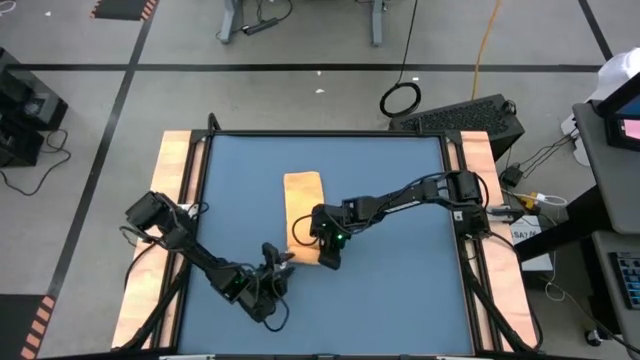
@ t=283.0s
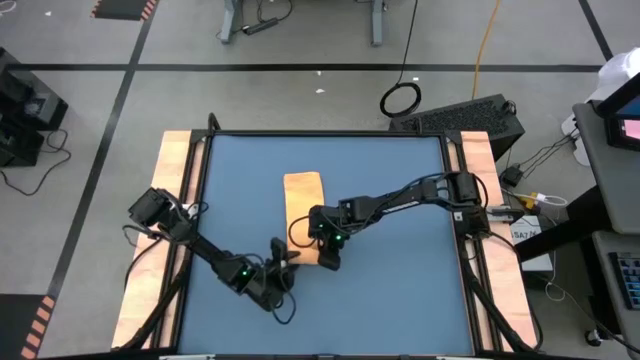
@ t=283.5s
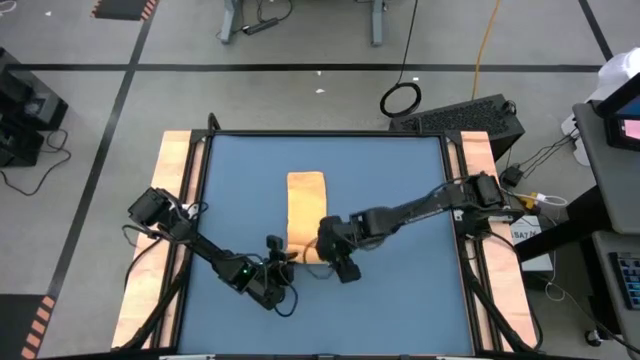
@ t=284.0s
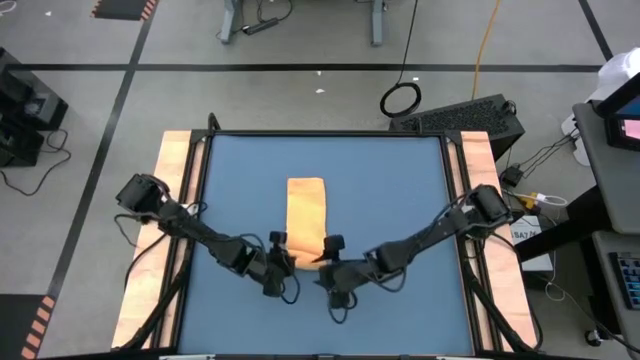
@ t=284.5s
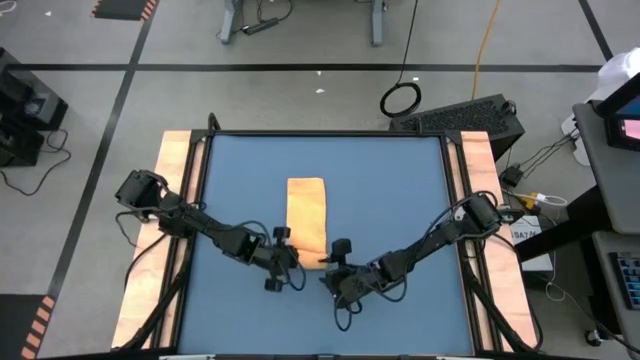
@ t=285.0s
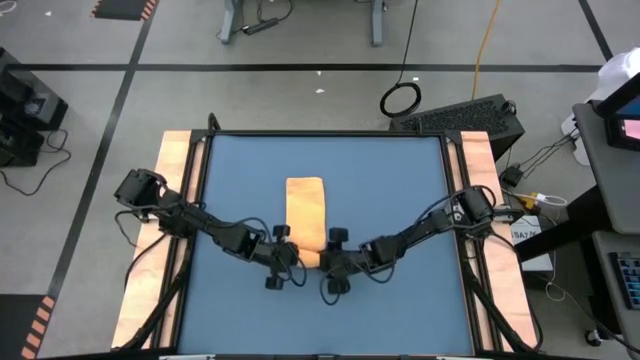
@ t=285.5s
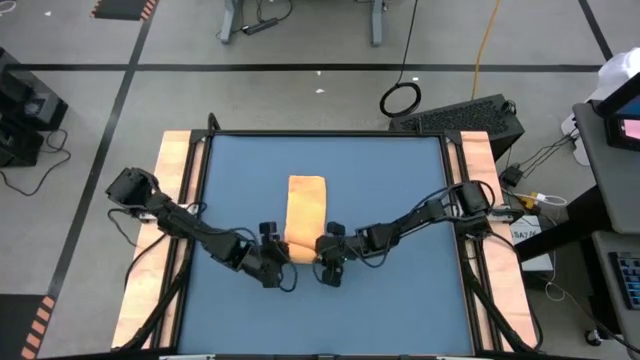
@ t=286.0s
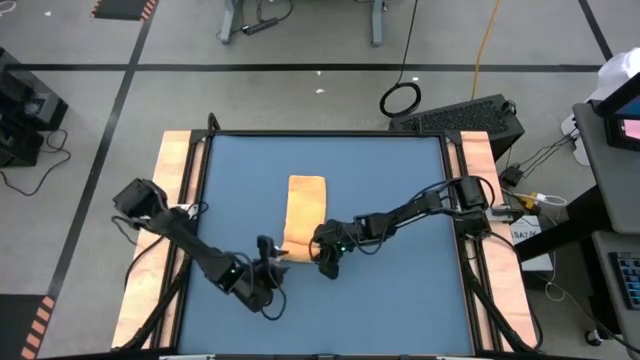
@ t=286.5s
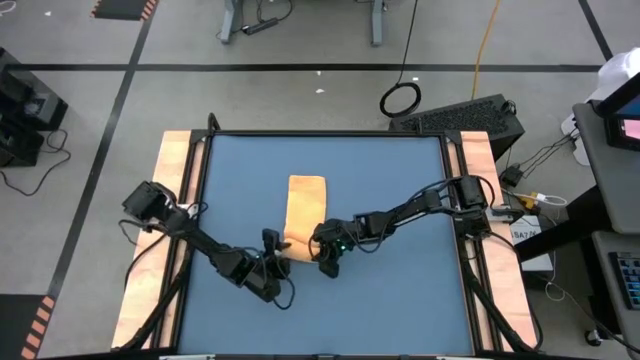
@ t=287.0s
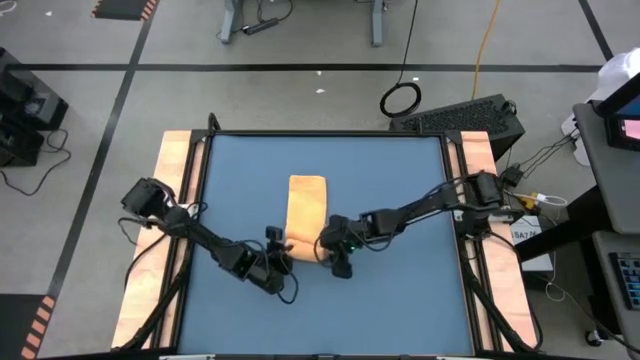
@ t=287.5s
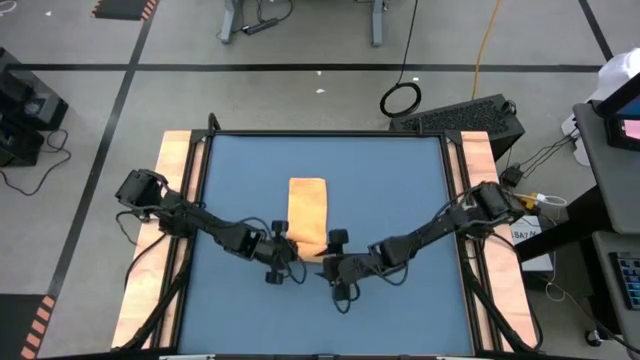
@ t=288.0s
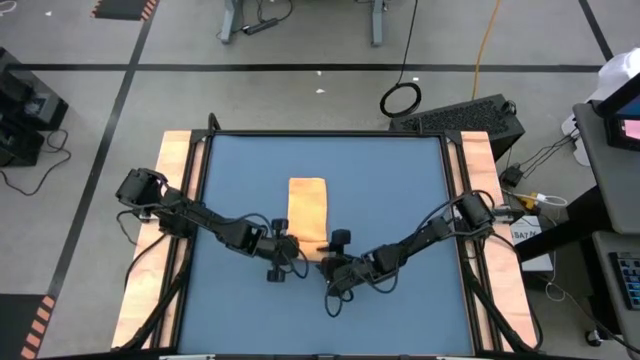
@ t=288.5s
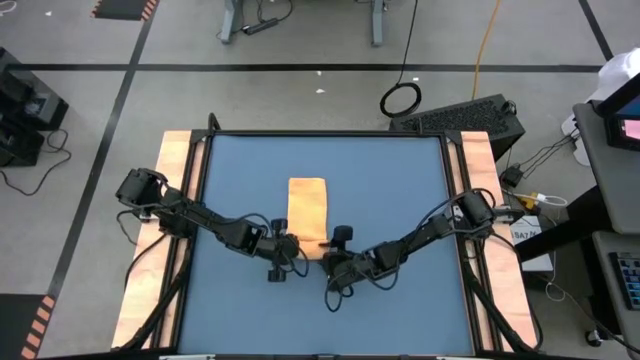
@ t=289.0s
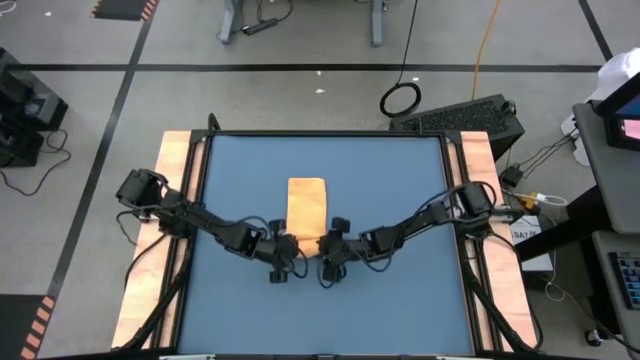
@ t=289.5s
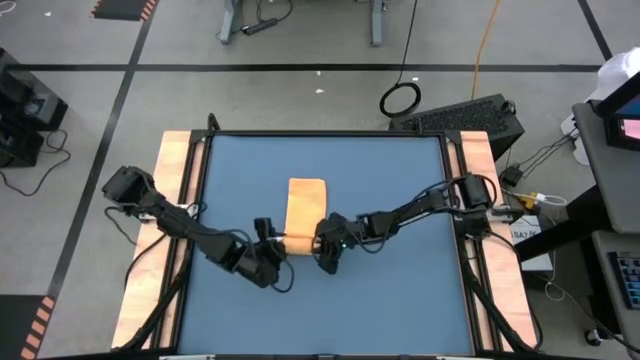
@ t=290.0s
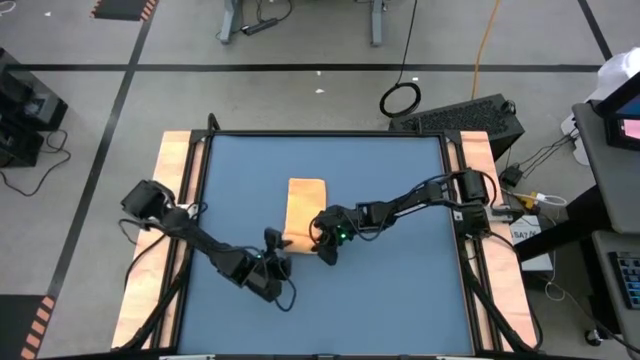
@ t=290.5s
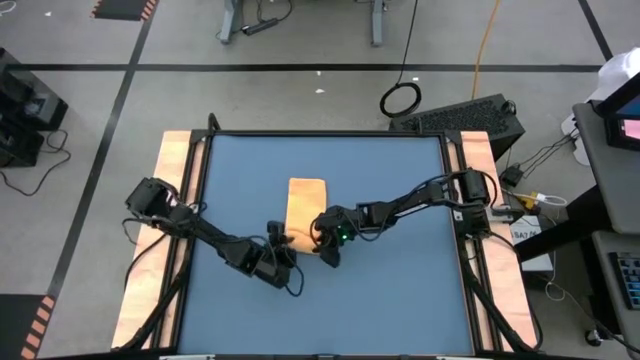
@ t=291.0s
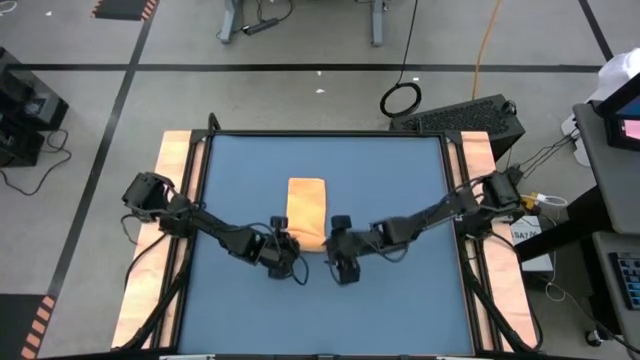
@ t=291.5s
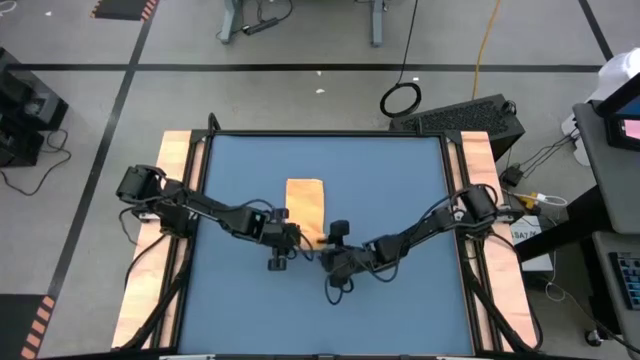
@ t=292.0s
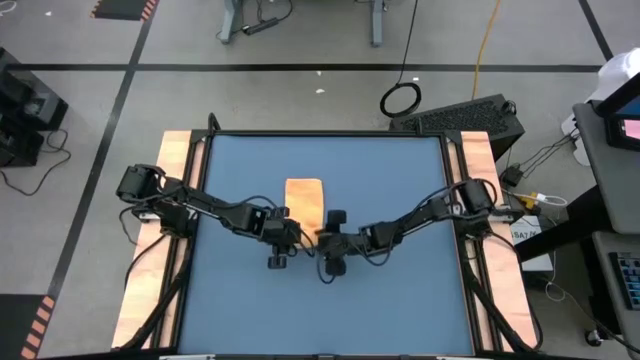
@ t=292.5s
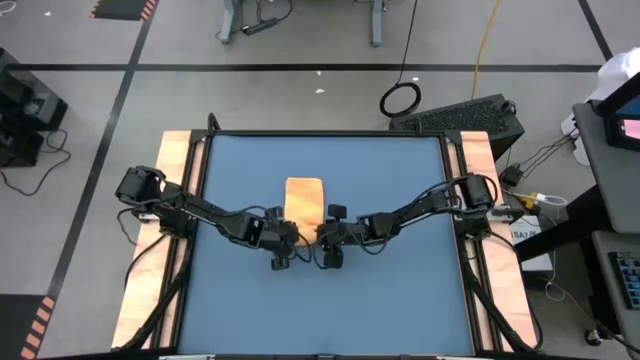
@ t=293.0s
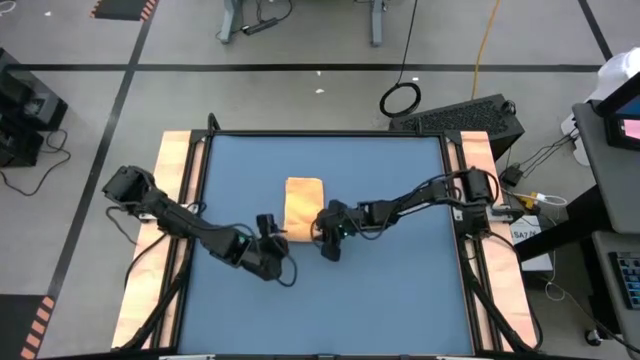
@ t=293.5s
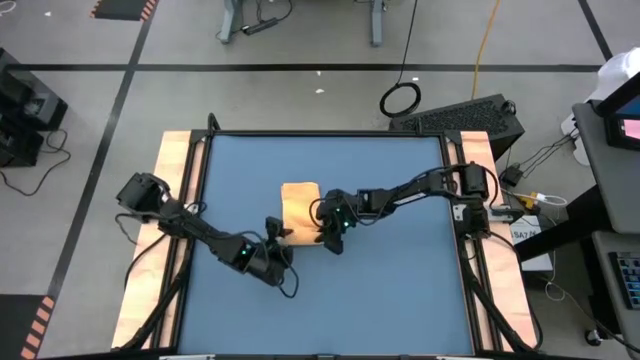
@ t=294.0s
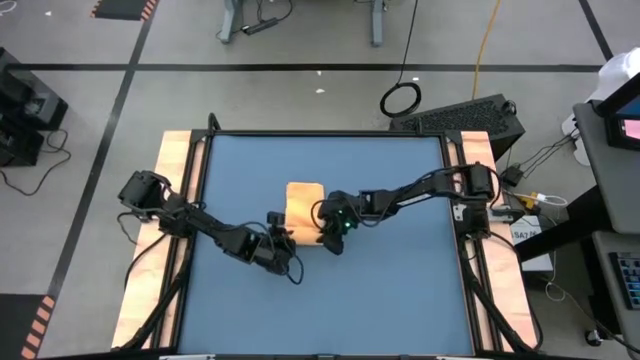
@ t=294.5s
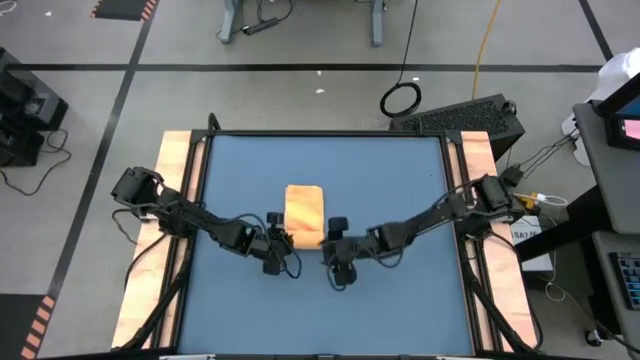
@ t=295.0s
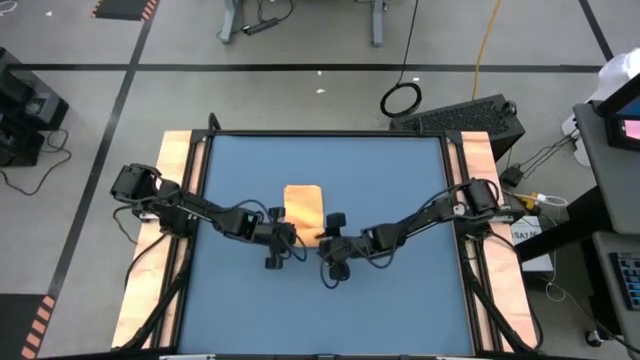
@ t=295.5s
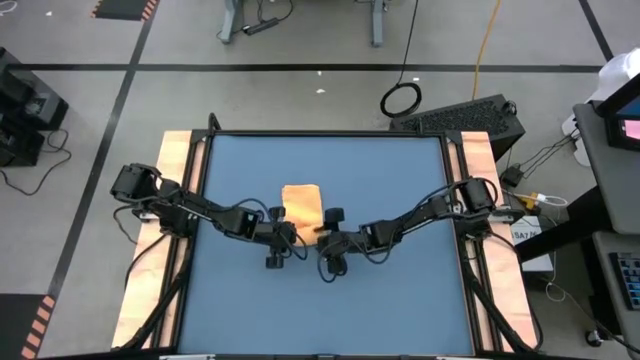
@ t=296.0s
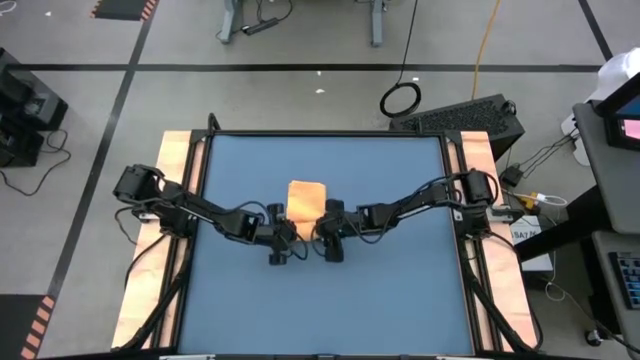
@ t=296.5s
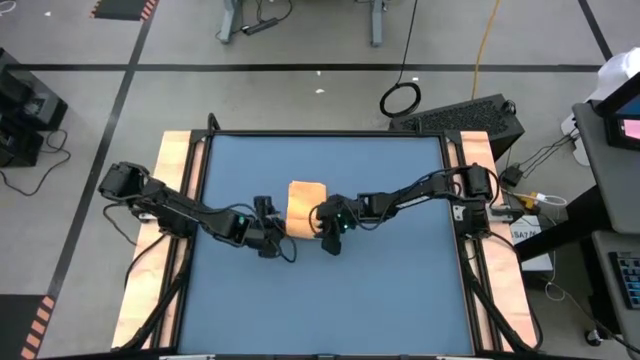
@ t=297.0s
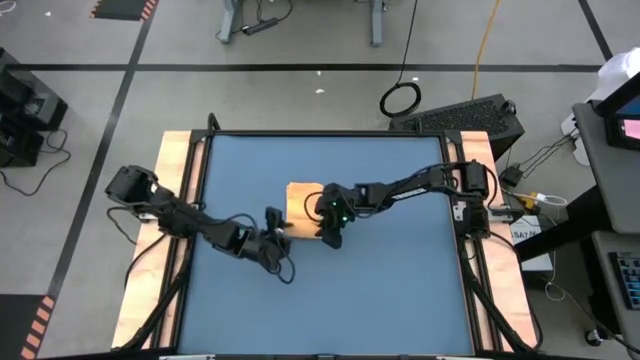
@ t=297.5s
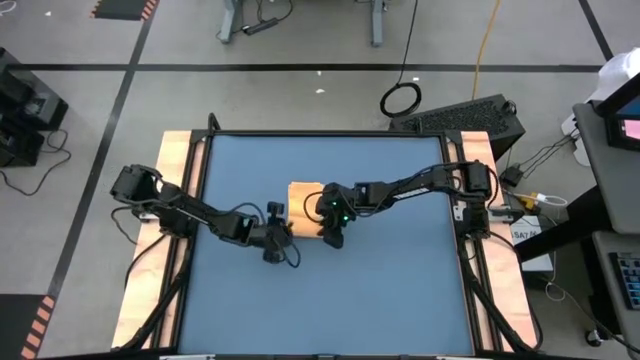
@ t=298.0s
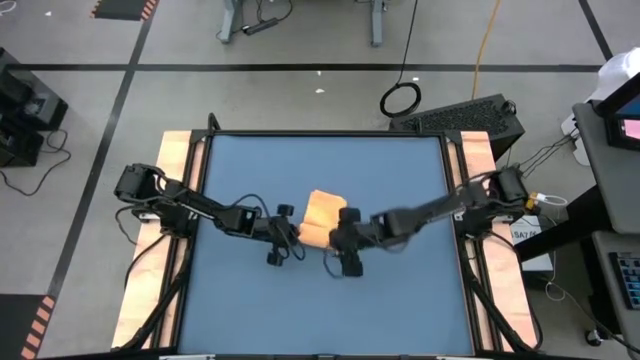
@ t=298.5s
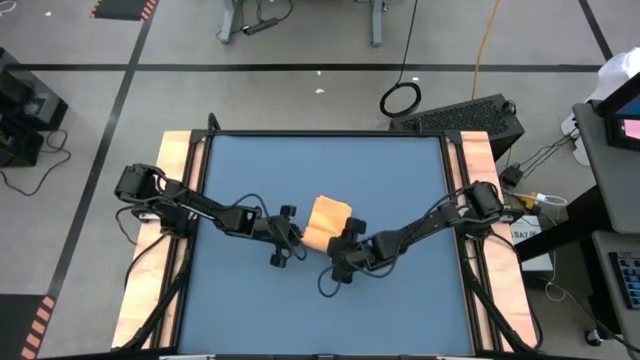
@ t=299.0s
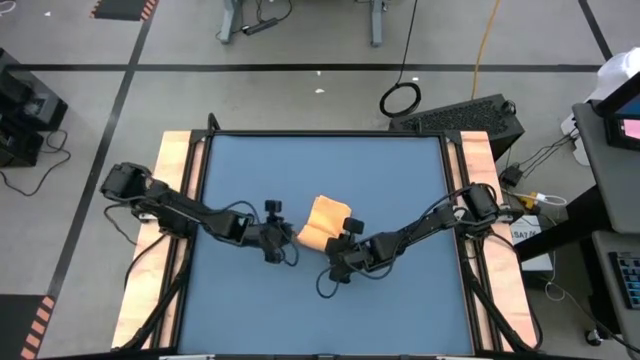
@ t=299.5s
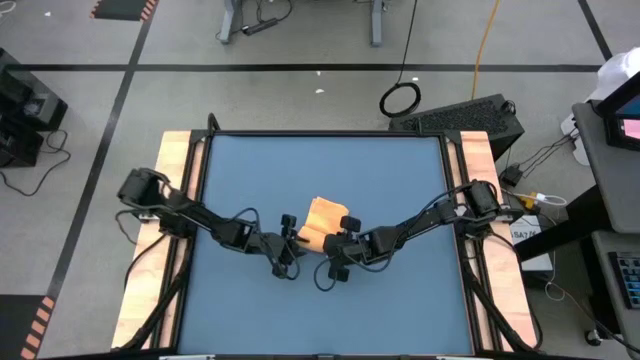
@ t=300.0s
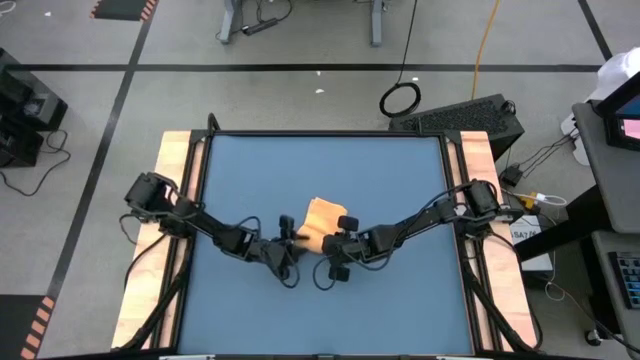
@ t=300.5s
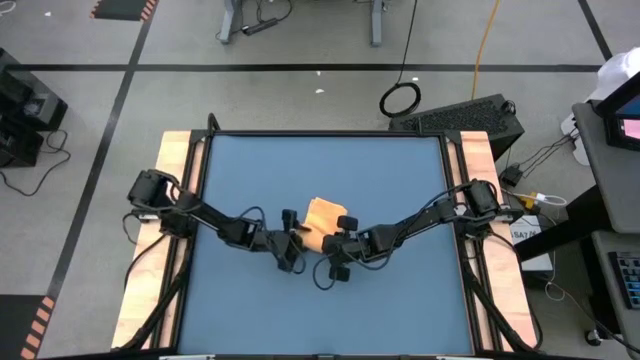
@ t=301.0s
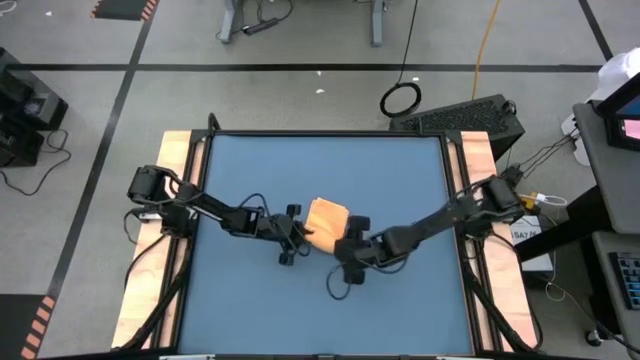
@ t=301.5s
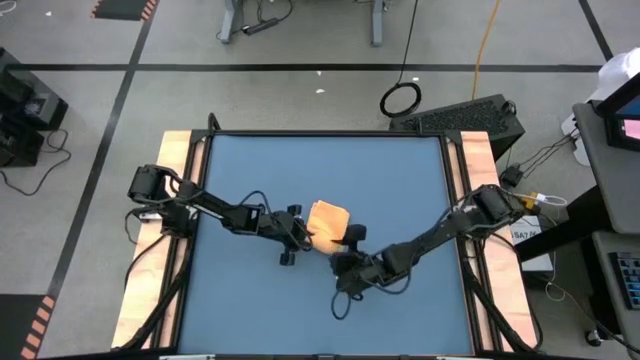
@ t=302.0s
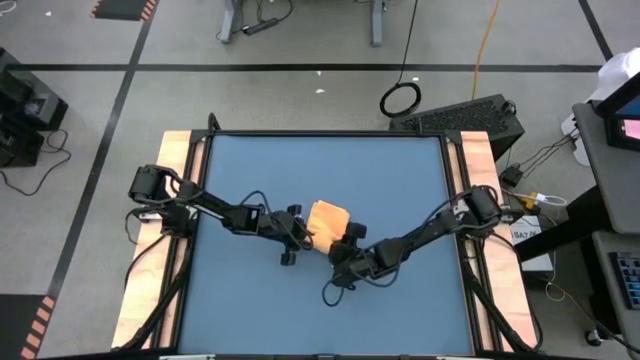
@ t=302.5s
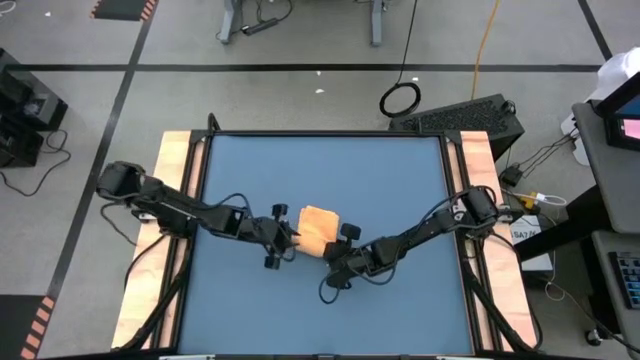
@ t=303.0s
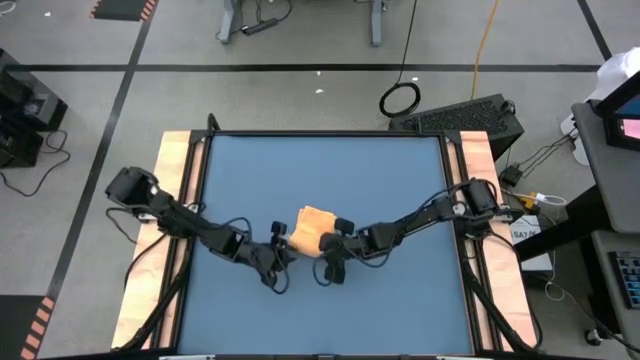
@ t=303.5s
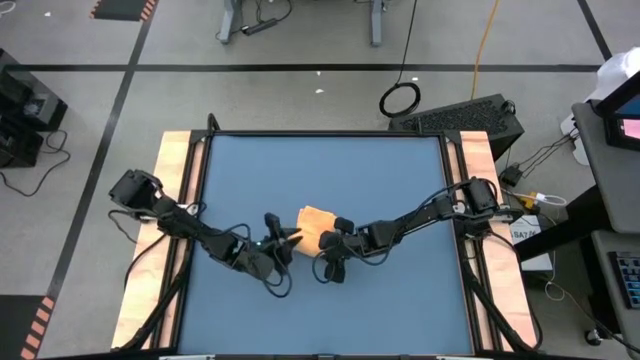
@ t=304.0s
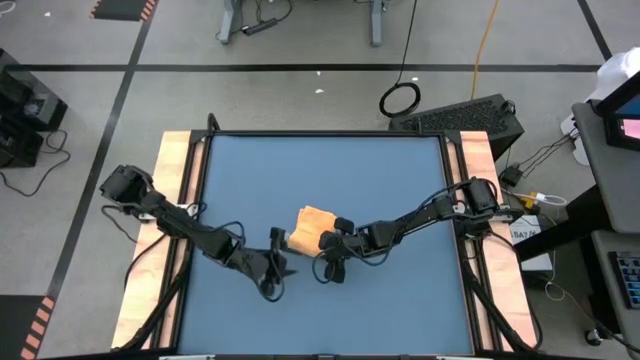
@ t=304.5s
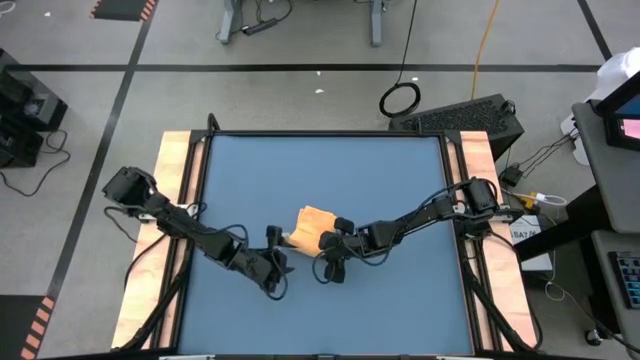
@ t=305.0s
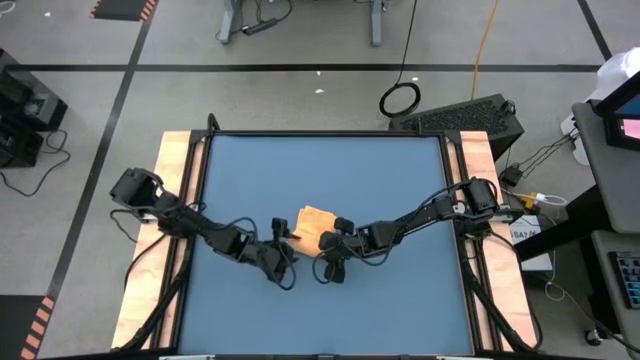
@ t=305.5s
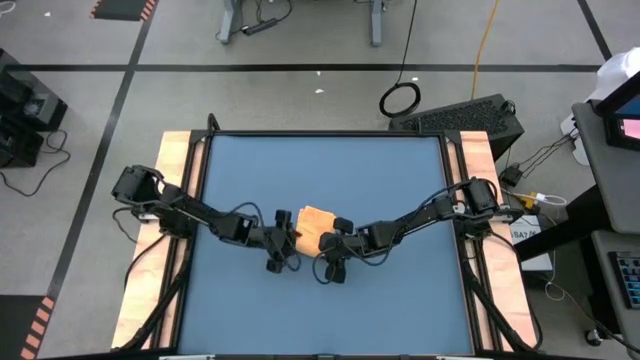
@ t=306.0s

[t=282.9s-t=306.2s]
Task: Roll towel into tight, uniform cylinder
Roll the orange microfiber cloth
